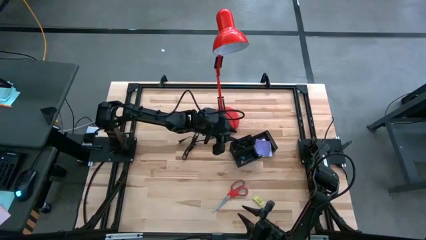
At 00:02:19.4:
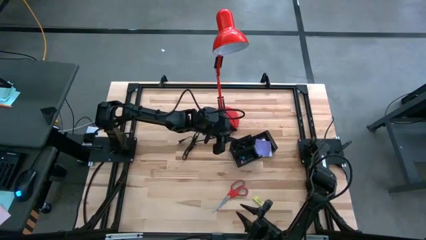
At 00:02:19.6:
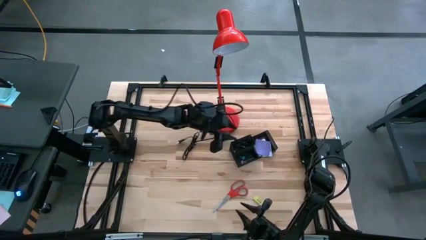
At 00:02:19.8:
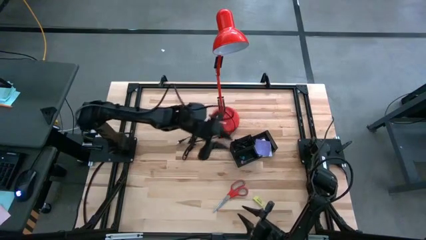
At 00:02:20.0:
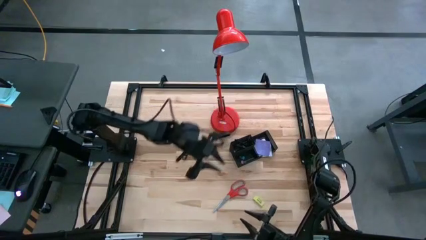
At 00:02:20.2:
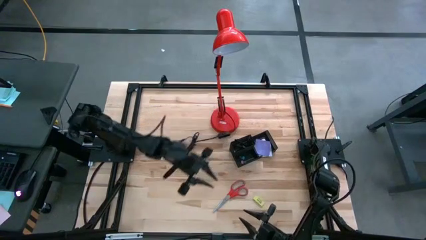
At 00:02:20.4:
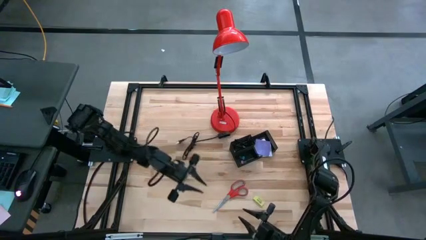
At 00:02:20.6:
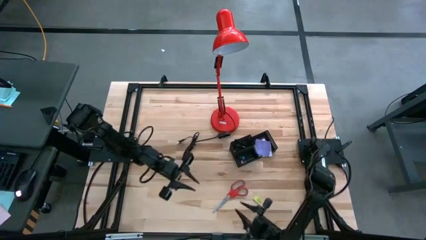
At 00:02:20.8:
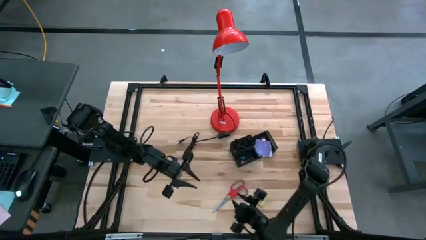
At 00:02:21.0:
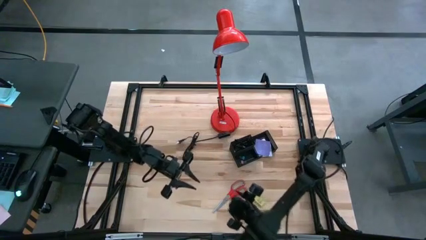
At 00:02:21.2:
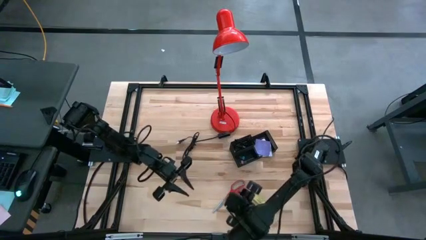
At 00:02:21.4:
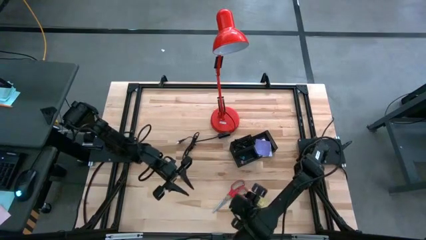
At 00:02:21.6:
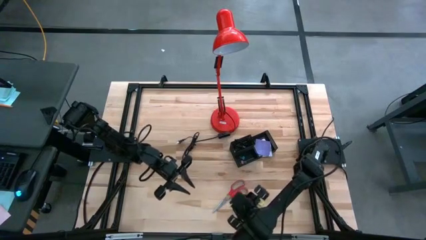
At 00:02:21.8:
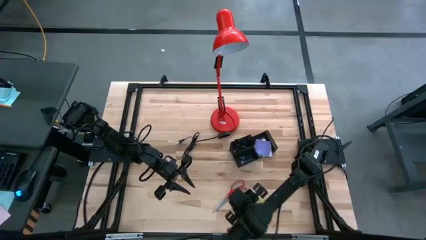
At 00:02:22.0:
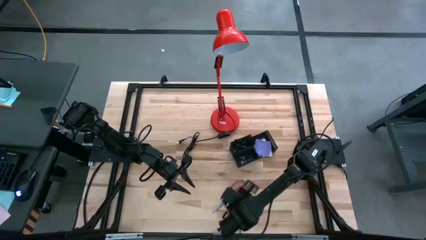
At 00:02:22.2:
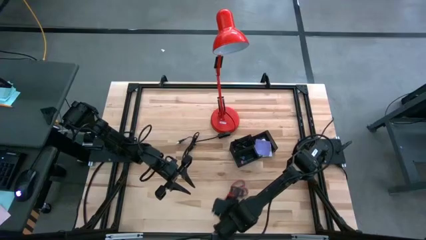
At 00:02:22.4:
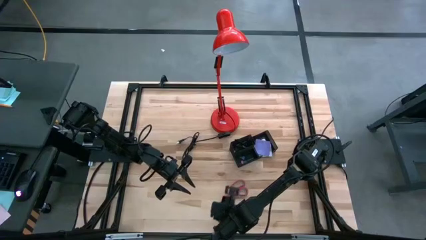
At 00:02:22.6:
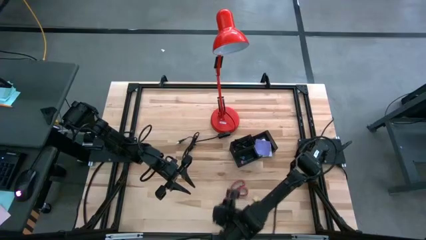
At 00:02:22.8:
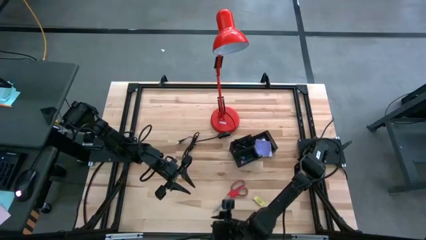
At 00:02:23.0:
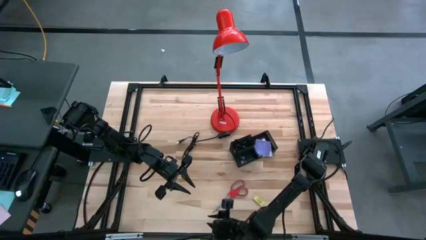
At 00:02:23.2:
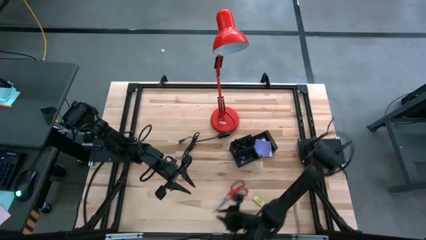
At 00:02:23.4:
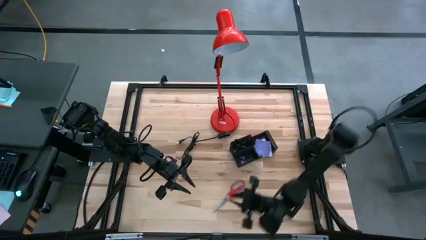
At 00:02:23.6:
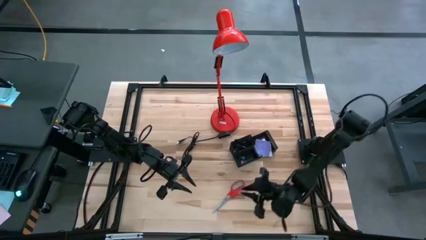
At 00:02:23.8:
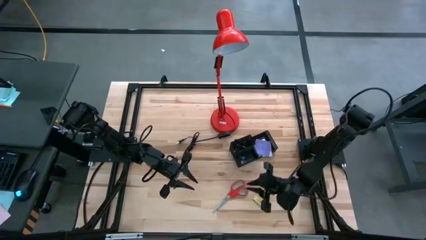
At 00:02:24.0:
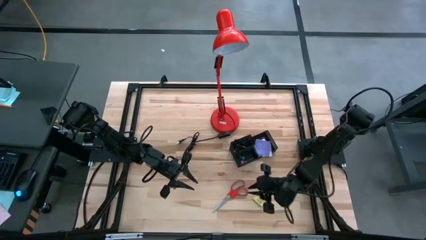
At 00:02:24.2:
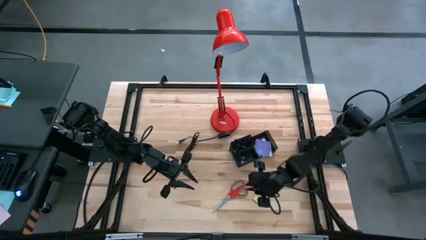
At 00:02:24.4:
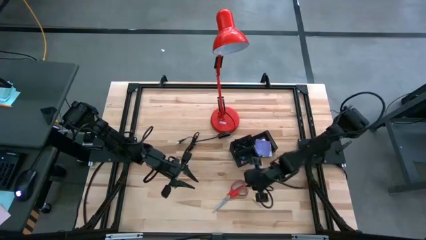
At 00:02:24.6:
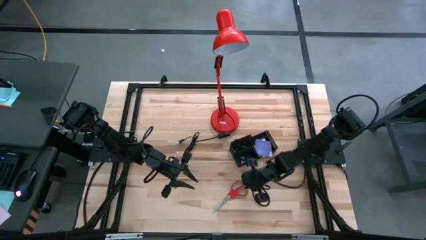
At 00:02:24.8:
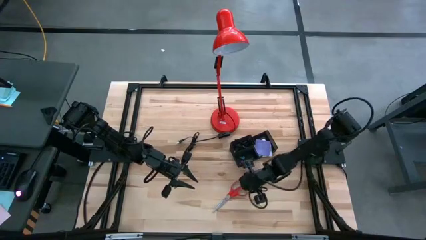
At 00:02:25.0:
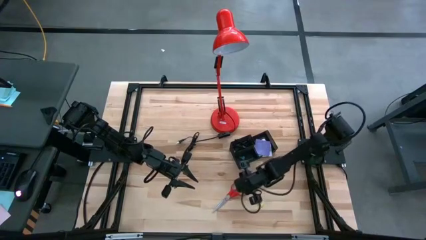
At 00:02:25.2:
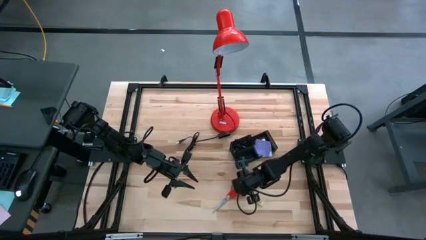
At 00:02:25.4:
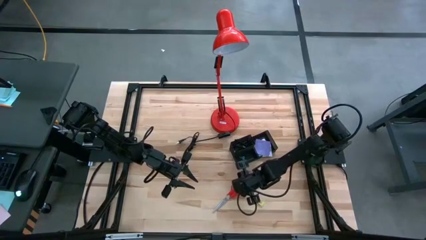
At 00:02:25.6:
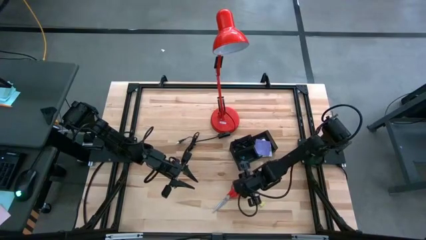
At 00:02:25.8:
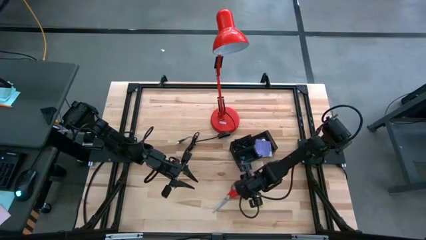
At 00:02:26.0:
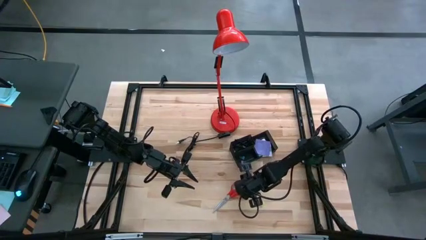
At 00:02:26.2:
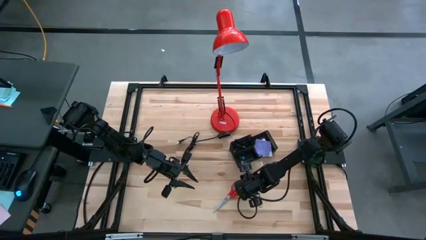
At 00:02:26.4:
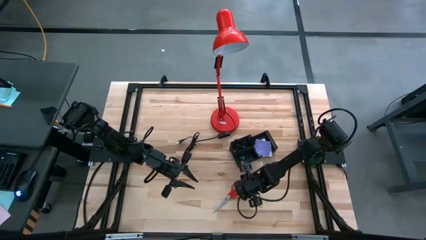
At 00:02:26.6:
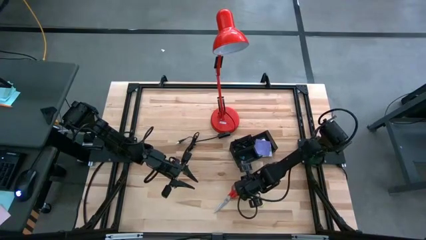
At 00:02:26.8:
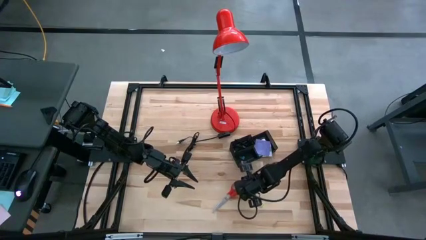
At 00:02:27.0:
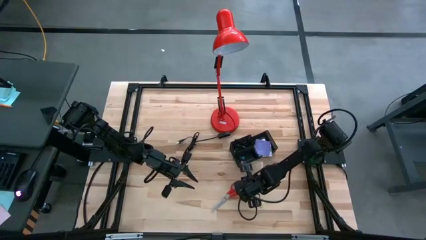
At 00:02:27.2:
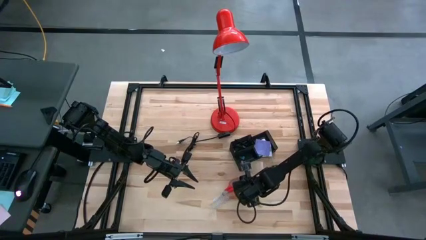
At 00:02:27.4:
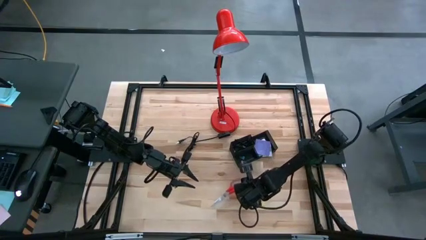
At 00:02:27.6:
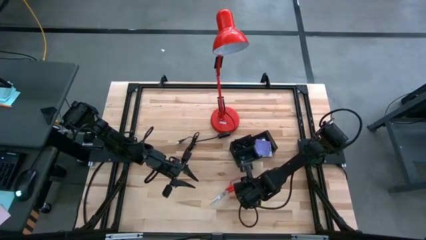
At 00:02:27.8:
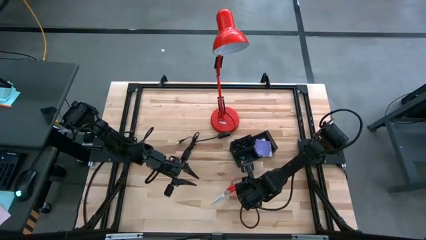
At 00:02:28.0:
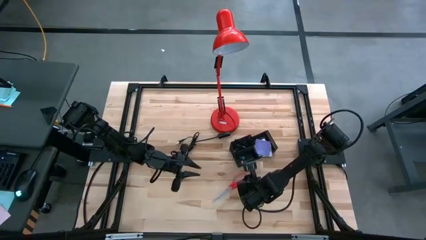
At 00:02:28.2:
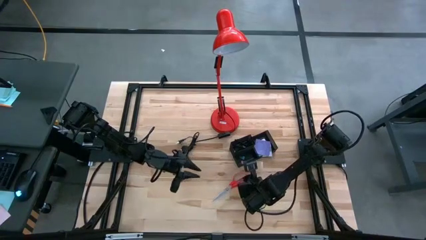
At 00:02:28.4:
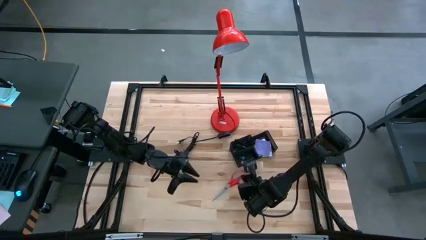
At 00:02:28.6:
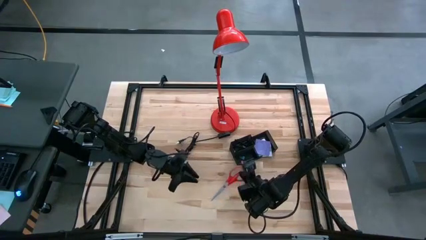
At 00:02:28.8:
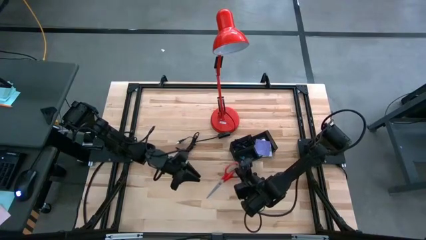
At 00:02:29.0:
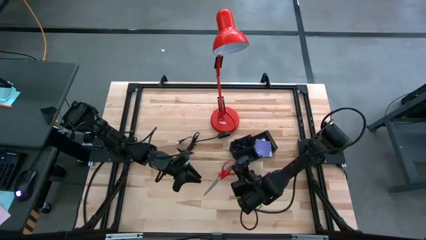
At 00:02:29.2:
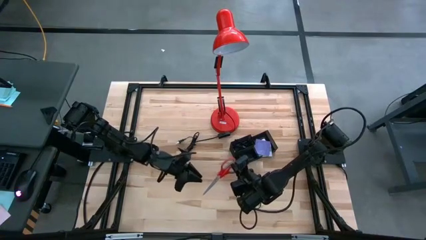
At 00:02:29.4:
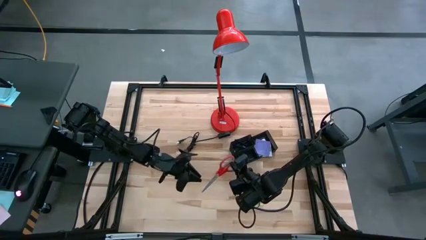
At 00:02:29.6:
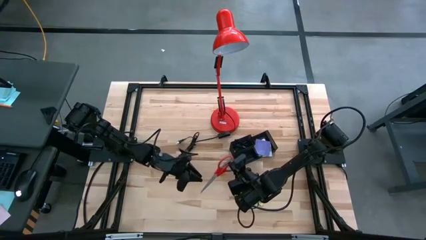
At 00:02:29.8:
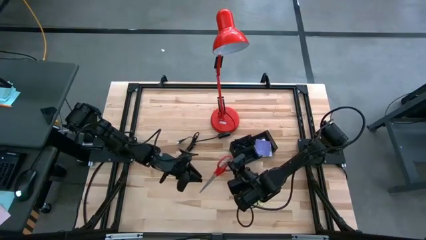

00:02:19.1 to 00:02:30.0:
Task: Pick and place office supplies into organizer
Put the scissors into the desk organizer
